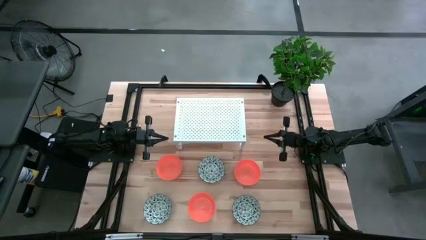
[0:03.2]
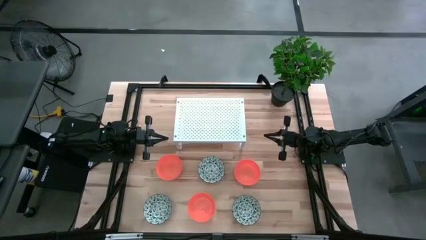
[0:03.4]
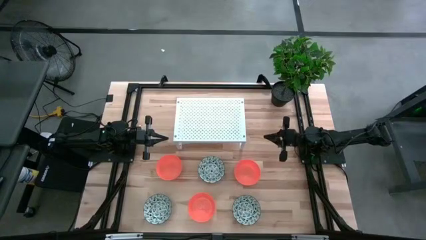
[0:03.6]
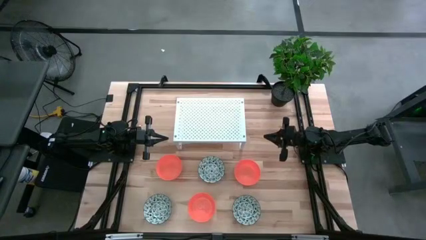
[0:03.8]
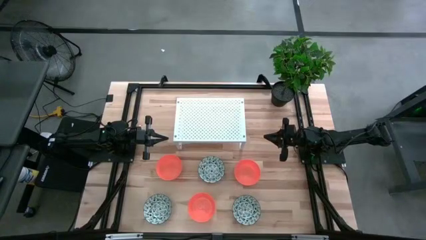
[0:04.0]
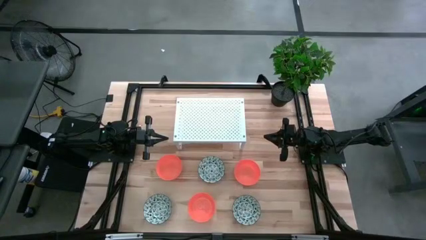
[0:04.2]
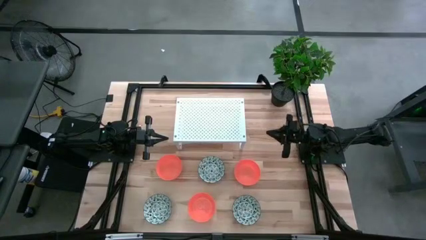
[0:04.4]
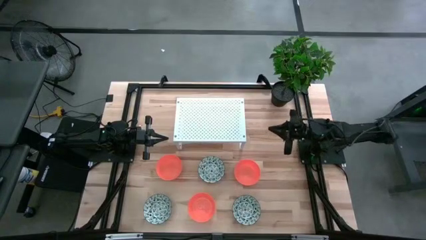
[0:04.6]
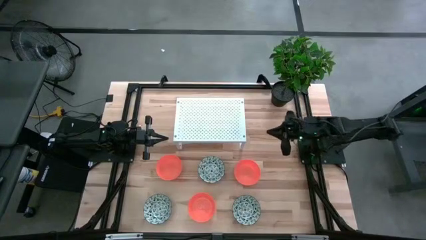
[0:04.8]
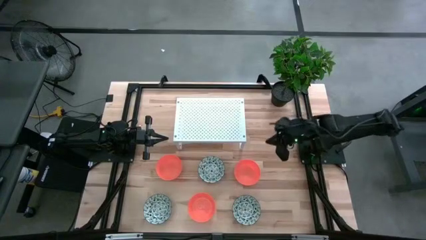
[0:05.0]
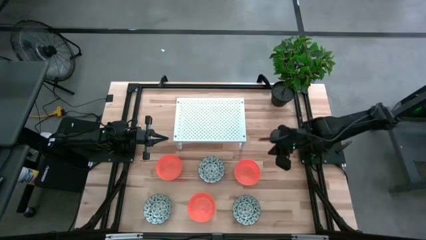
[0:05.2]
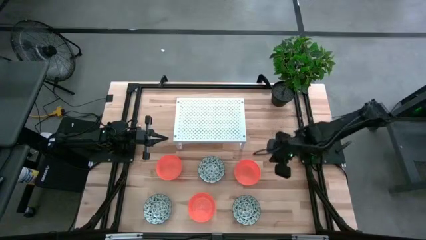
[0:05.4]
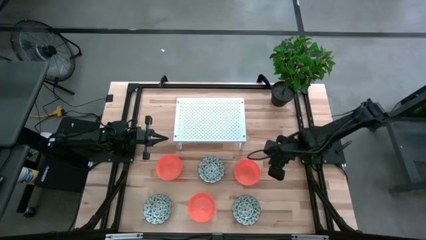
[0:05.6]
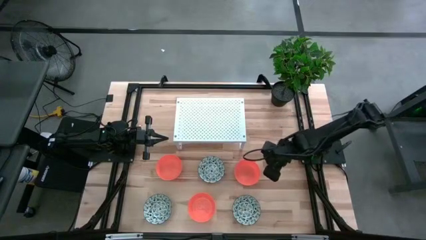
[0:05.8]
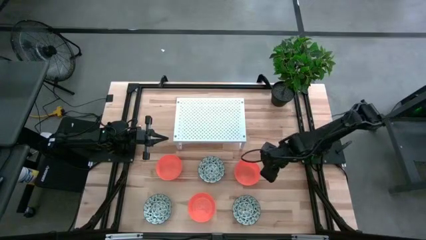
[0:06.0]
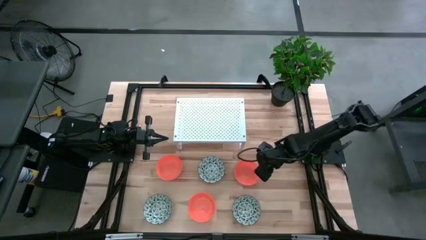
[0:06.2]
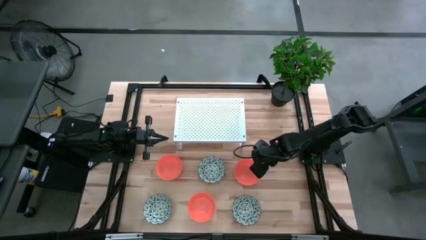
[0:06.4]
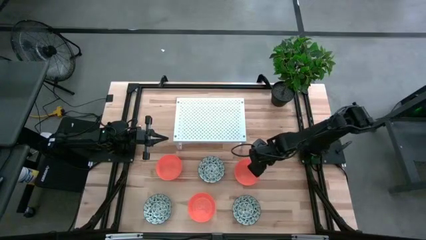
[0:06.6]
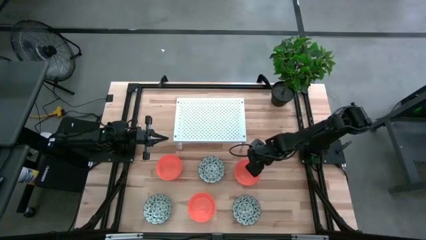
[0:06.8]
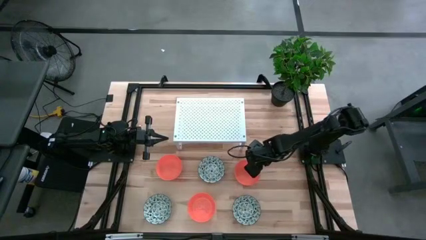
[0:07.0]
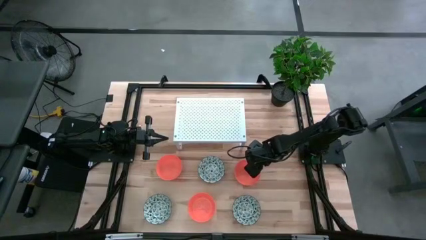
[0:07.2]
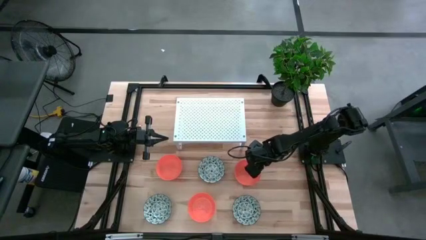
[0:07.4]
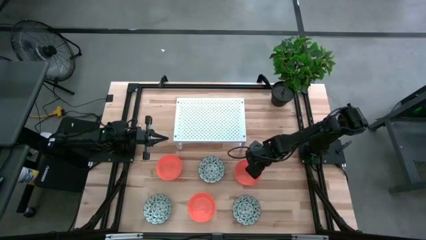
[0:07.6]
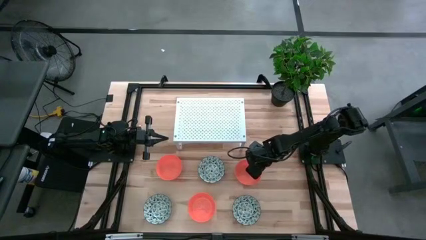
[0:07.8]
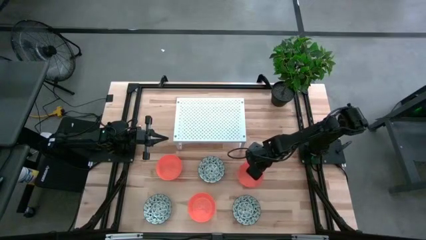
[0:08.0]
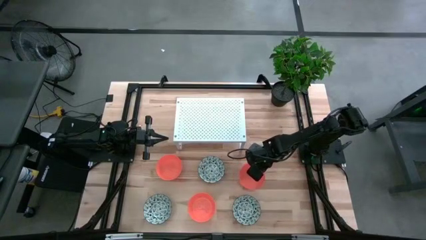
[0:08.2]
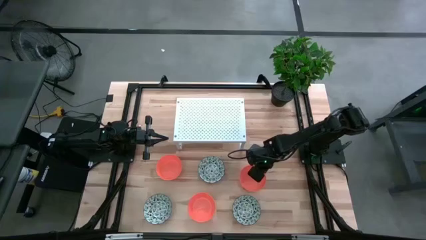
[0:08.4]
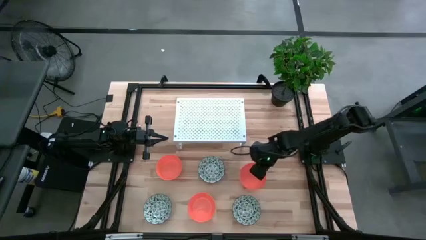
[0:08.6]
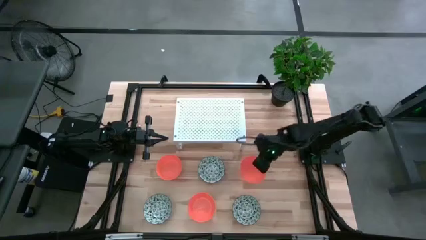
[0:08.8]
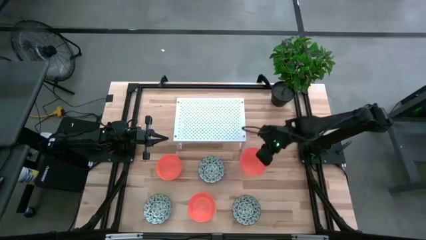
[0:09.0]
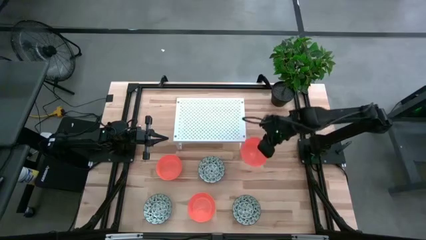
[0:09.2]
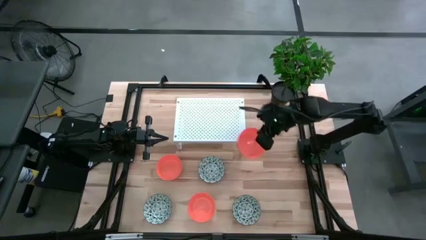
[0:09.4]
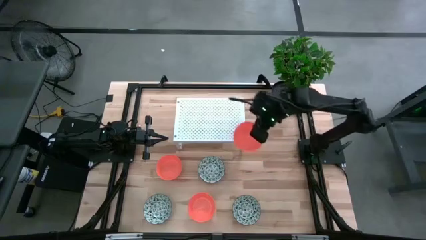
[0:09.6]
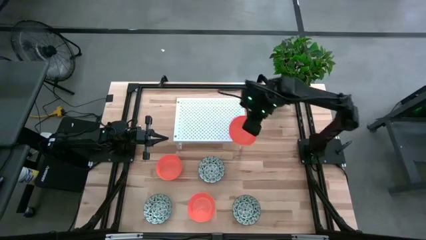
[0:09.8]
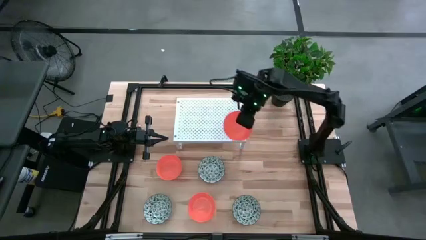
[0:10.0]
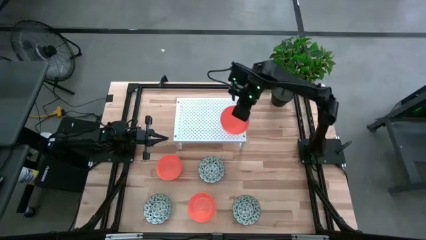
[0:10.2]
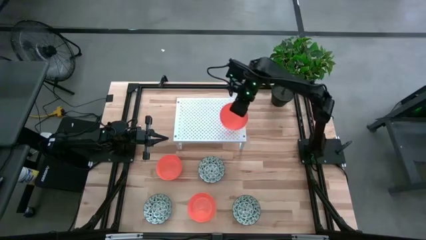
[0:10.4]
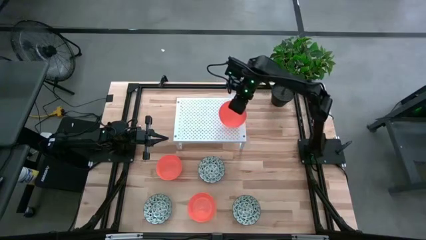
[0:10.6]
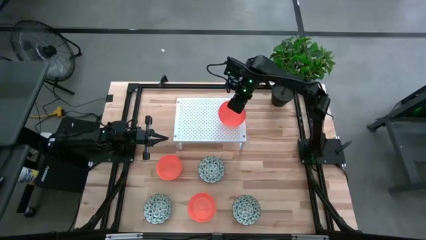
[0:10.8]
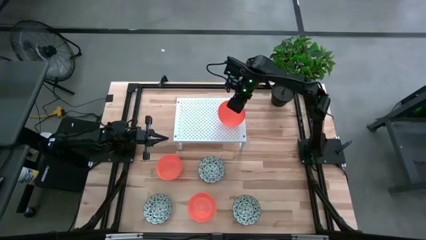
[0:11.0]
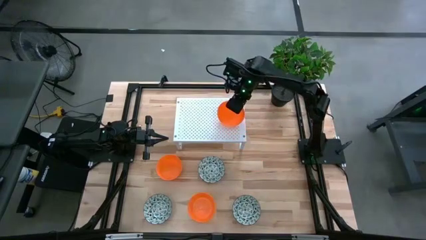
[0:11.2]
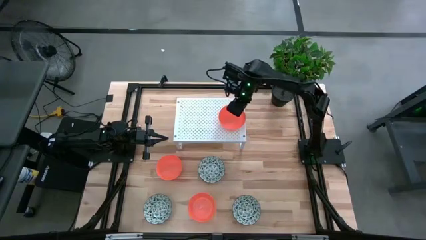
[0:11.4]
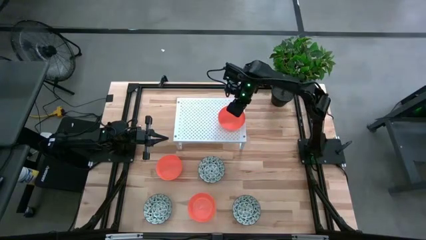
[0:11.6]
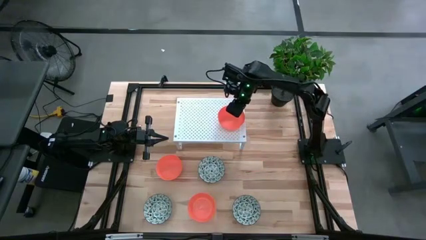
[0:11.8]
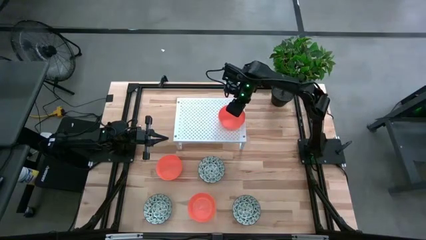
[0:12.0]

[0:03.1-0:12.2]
Task: Pick & Place Mini bowls
Put the top right orange bowl on the shelf

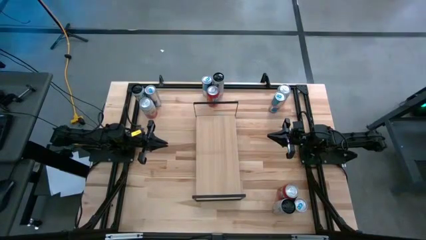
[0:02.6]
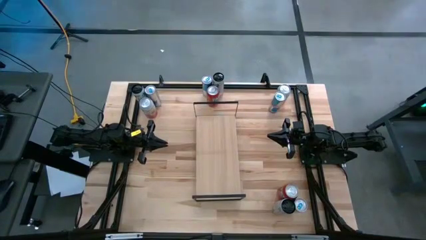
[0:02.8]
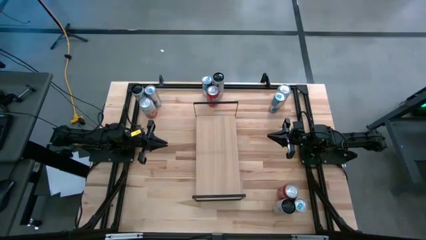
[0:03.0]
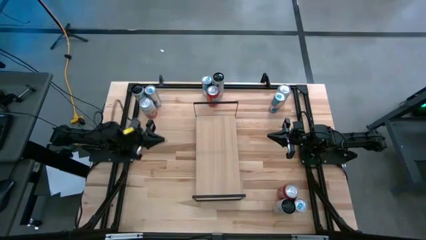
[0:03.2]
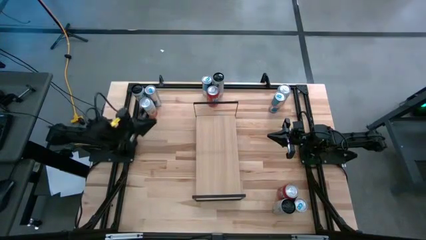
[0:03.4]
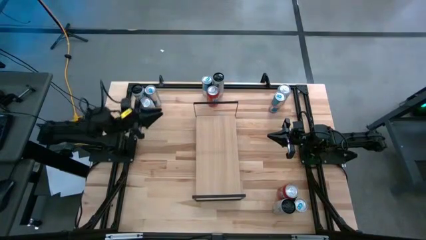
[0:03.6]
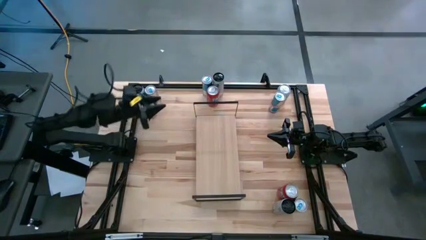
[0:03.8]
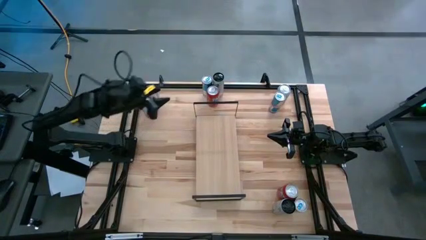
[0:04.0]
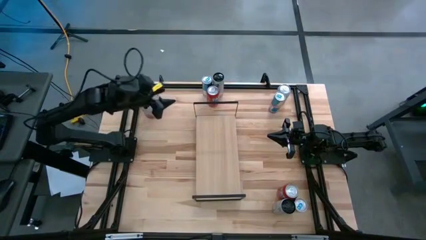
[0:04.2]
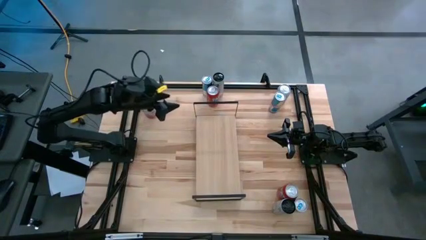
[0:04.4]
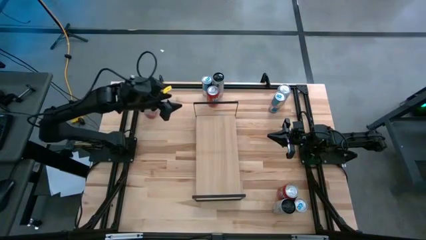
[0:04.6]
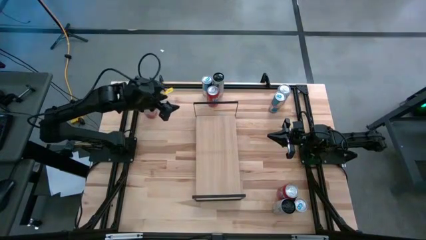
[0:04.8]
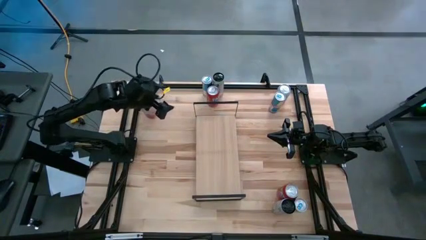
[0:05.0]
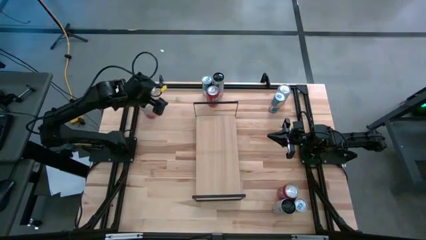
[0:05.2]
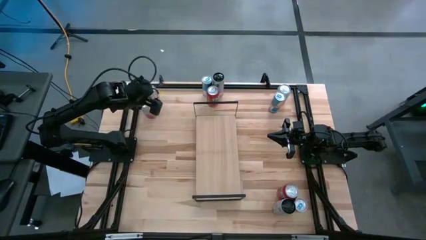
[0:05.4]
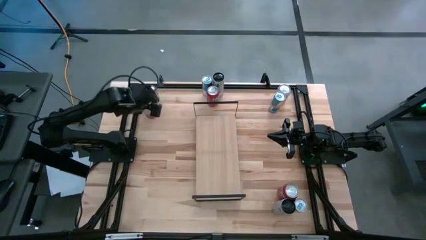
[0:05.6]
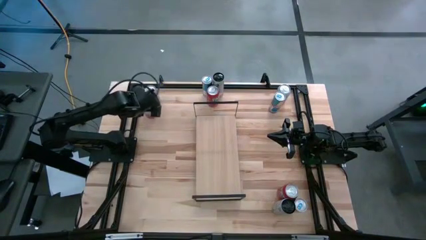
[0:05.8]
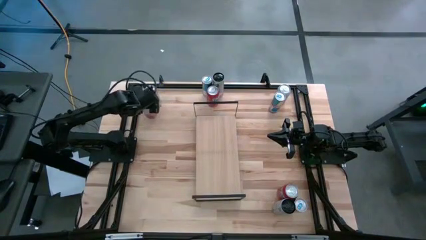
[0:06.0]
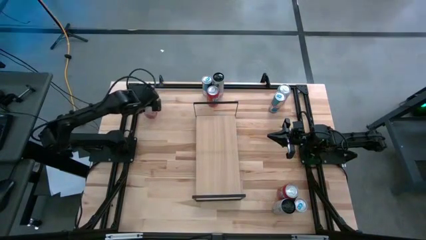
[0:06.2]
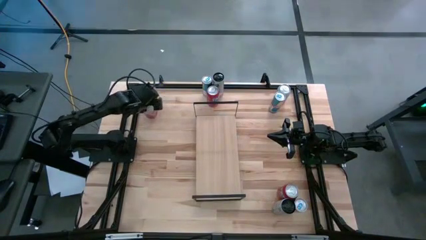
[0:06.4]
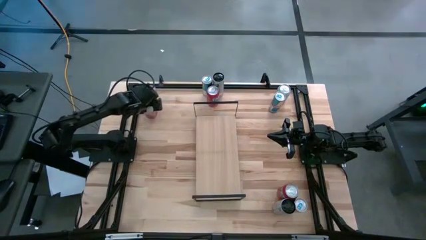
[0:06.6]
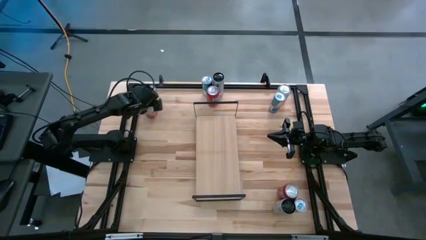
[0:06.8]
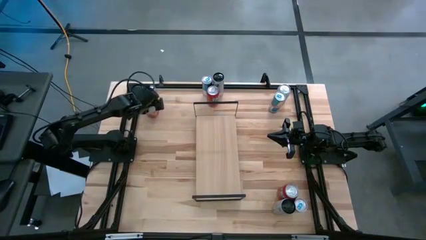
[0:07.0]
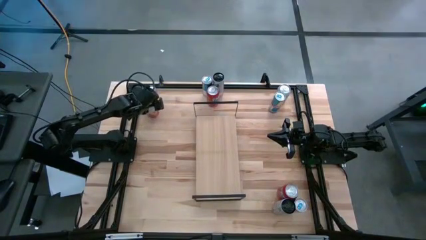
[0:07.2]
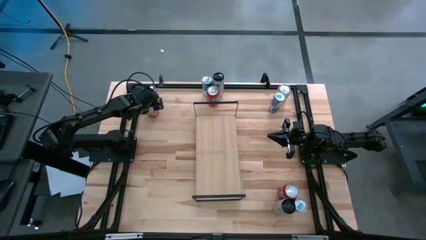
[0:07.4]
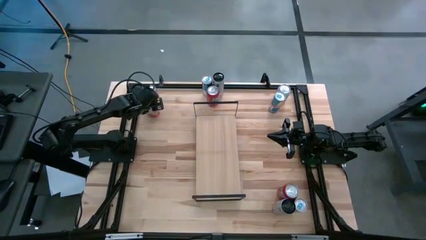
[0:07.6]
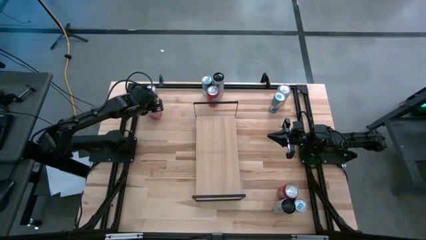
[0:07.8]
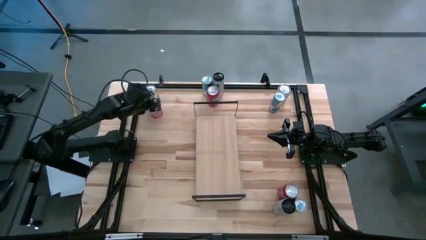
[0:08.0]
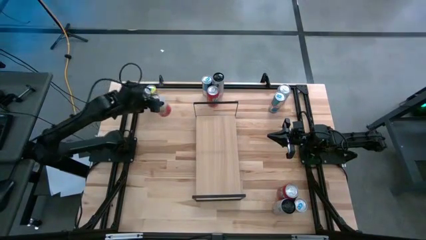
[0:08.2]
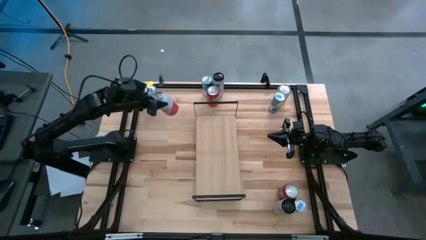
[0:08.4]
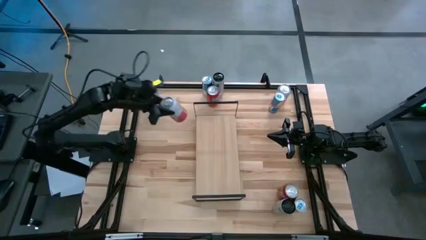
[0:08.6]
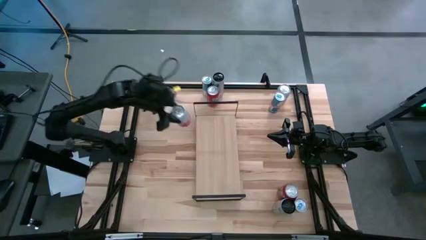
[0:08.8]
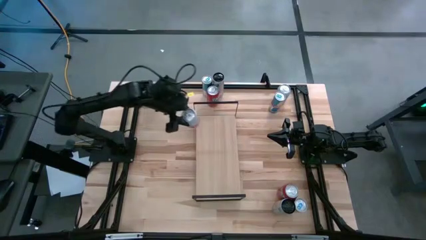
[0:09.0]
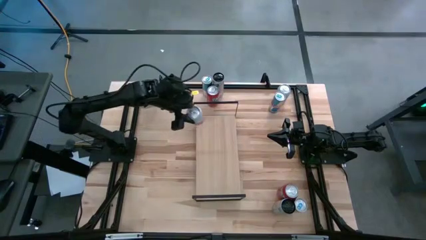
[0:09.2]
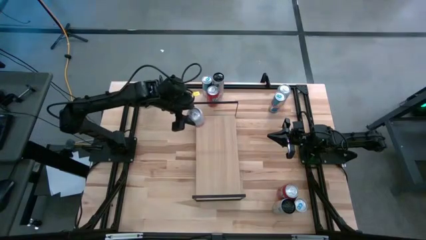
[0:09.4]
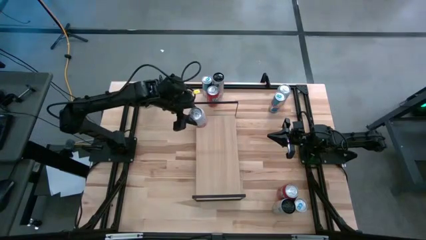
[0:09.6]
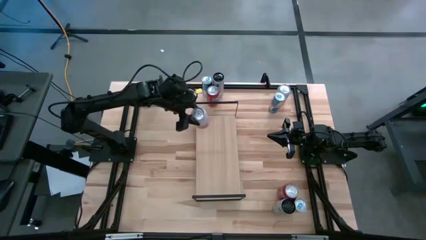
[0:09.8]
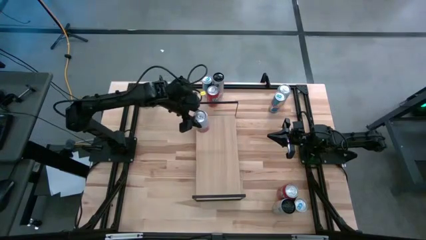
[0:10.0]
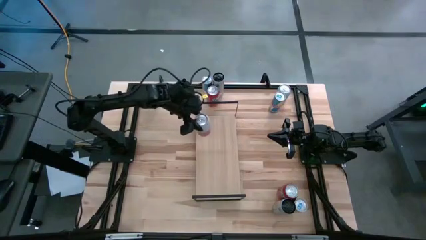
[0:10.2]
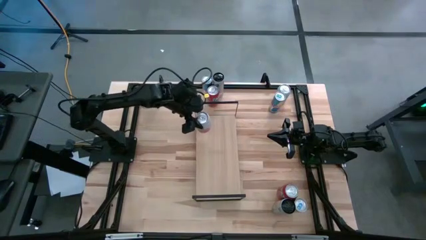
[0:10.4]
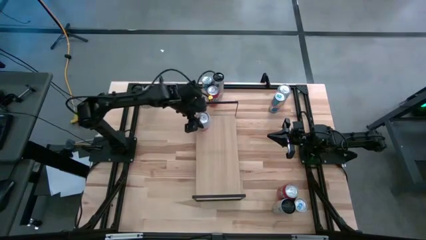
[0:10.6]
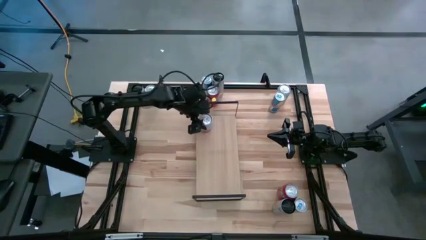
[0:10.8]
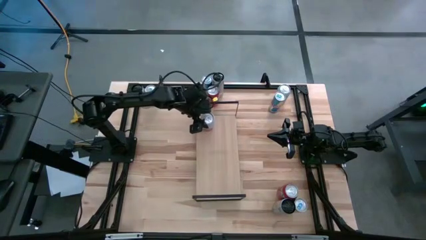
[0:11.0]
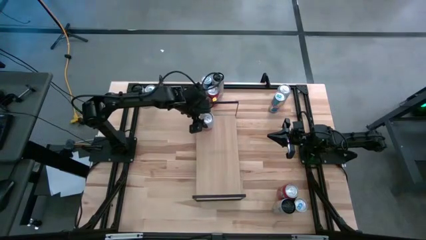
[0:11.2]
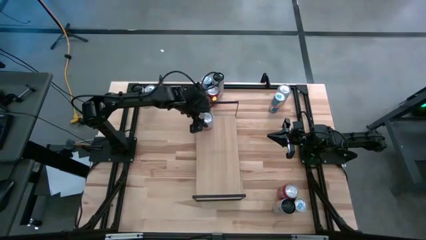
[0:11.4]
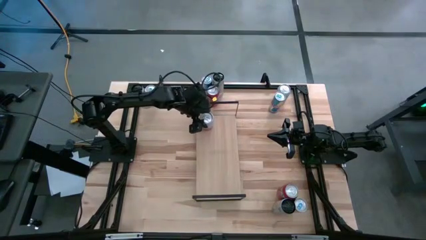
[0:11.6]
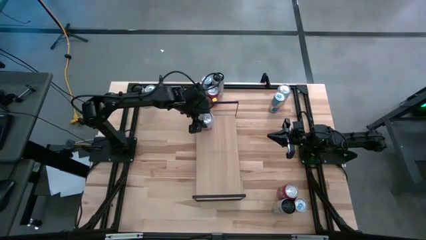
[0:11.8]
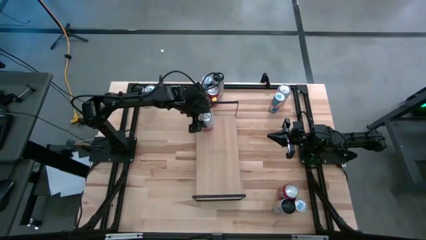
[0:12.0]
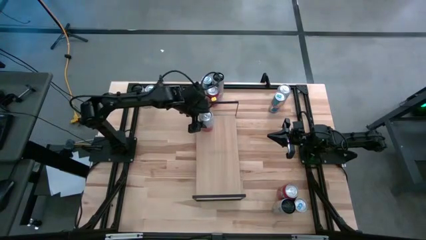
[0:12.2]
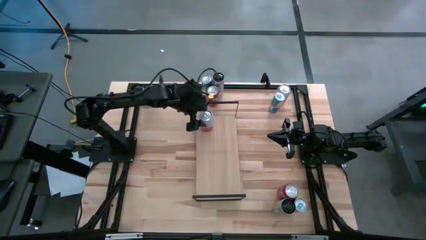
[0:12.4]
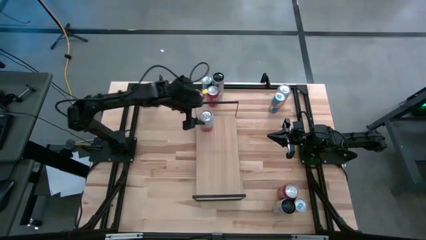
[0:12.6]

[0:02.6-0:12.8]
Task: Place canned beverage on shelf
Put the left pink white soda can on the shelf
